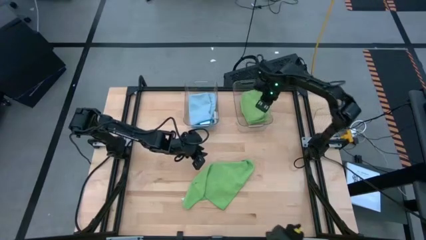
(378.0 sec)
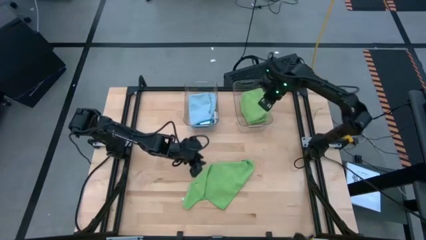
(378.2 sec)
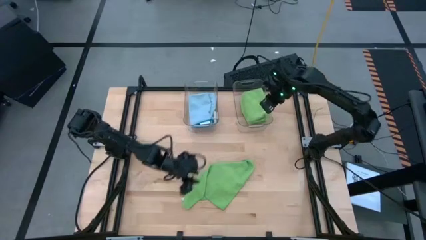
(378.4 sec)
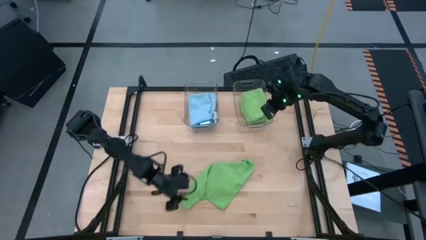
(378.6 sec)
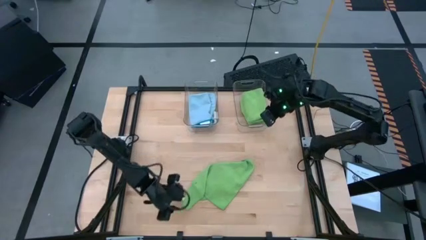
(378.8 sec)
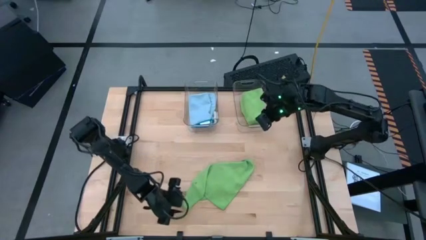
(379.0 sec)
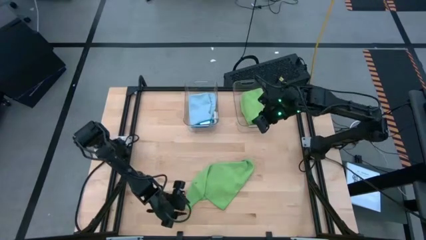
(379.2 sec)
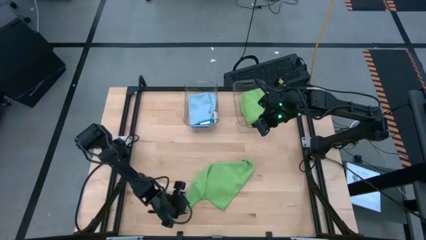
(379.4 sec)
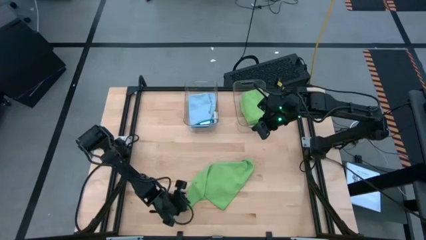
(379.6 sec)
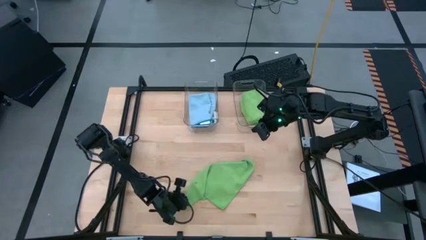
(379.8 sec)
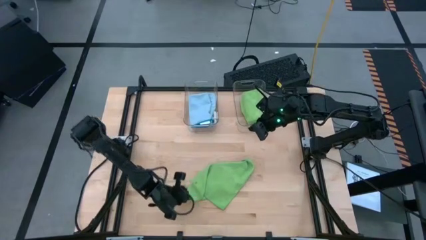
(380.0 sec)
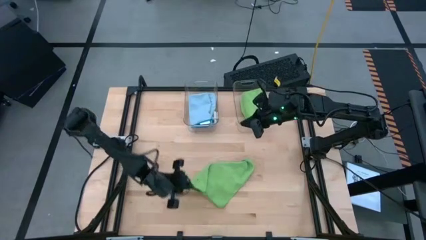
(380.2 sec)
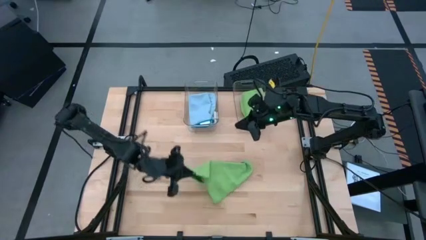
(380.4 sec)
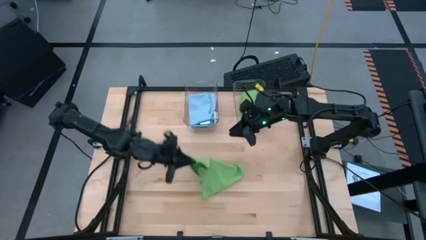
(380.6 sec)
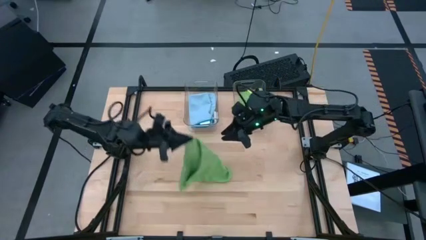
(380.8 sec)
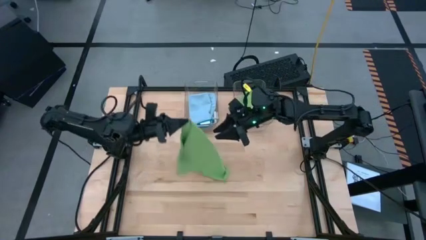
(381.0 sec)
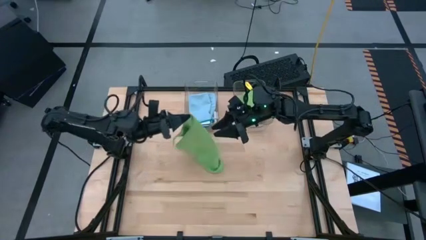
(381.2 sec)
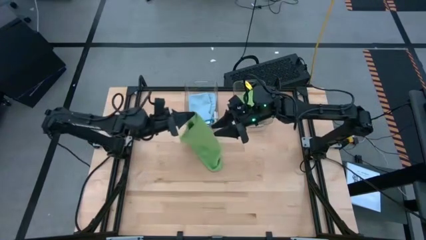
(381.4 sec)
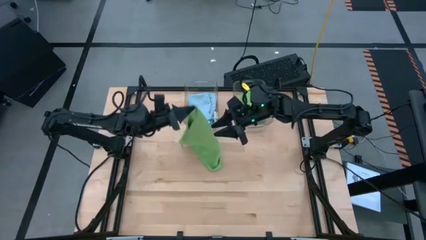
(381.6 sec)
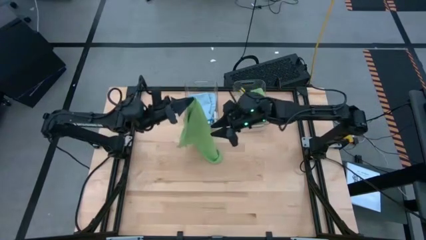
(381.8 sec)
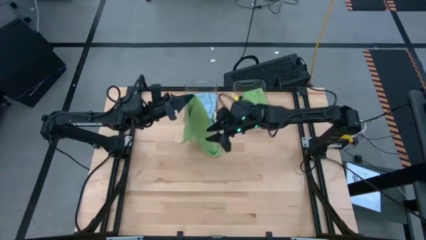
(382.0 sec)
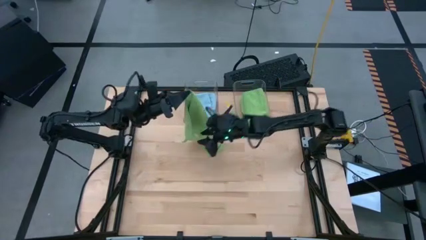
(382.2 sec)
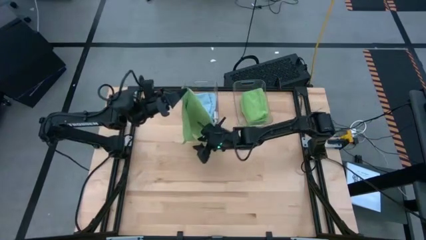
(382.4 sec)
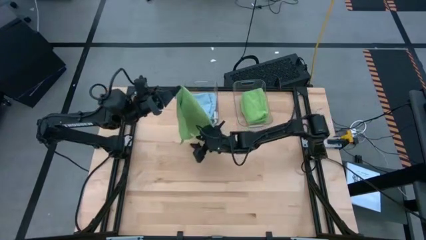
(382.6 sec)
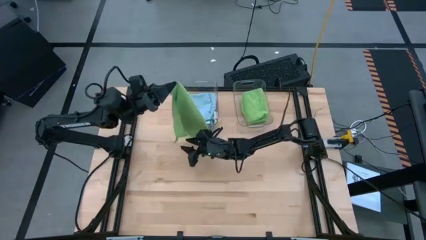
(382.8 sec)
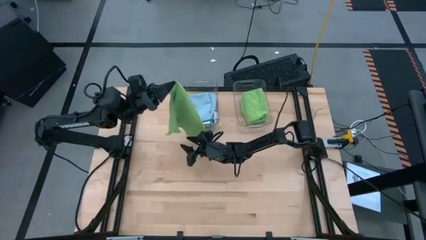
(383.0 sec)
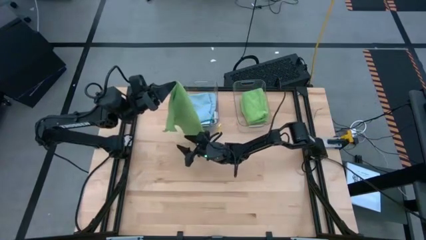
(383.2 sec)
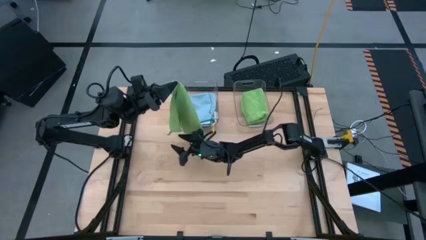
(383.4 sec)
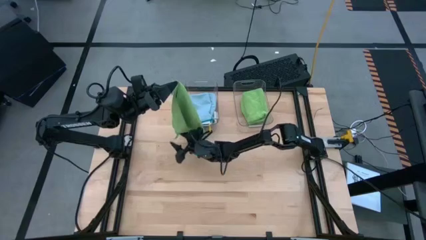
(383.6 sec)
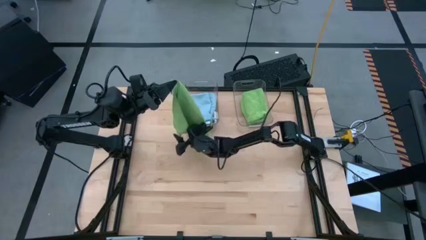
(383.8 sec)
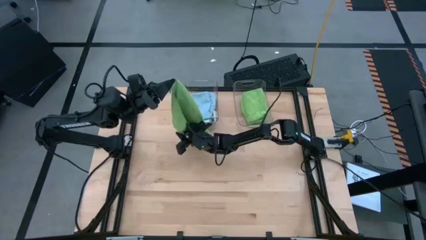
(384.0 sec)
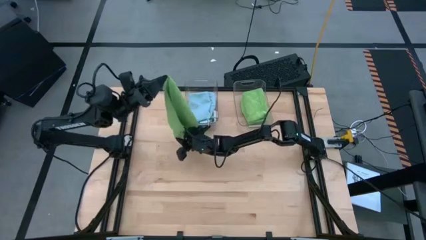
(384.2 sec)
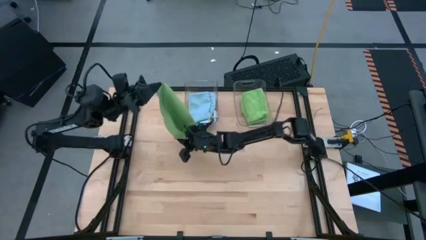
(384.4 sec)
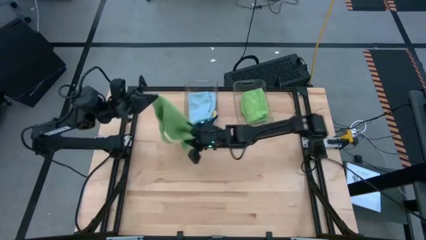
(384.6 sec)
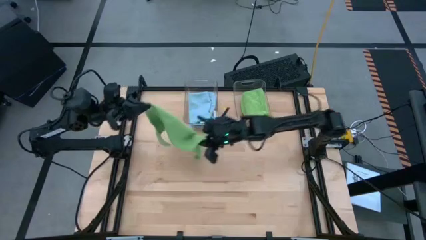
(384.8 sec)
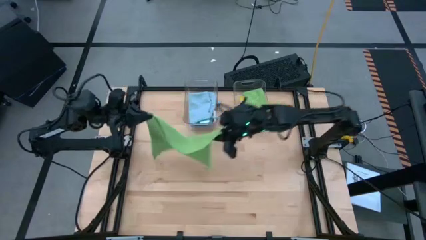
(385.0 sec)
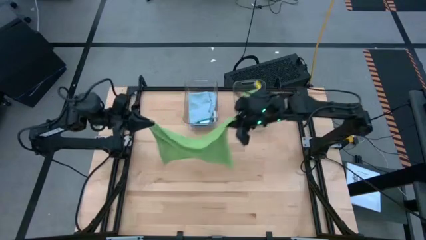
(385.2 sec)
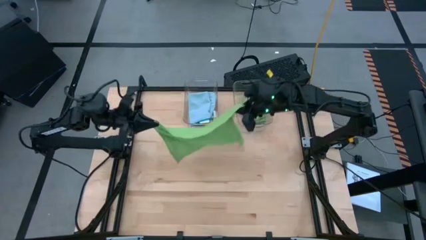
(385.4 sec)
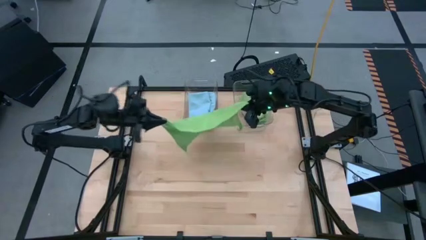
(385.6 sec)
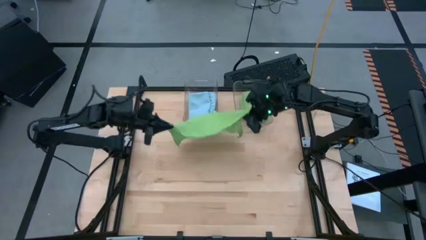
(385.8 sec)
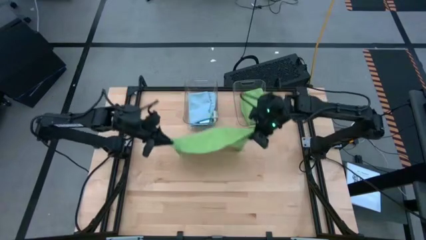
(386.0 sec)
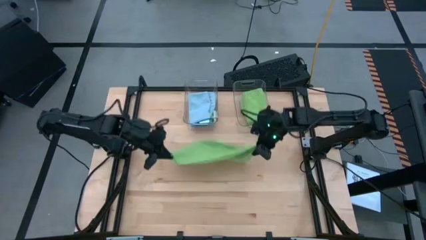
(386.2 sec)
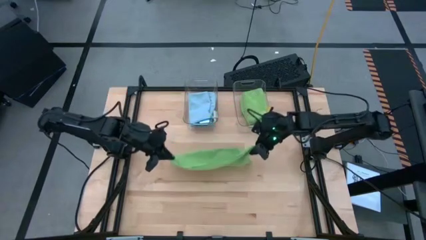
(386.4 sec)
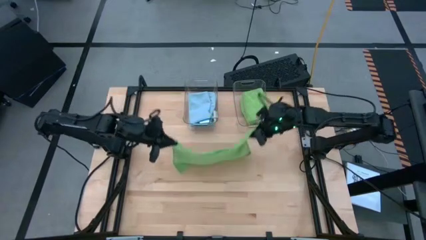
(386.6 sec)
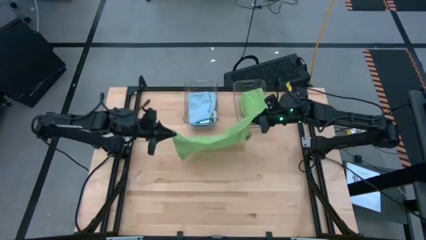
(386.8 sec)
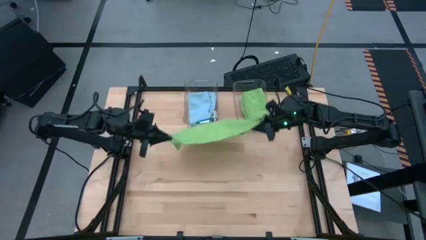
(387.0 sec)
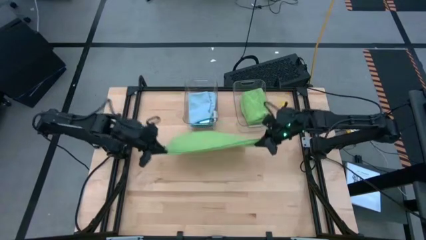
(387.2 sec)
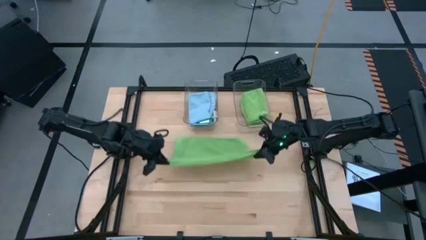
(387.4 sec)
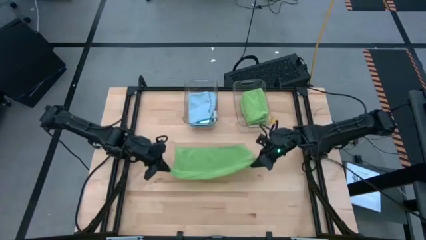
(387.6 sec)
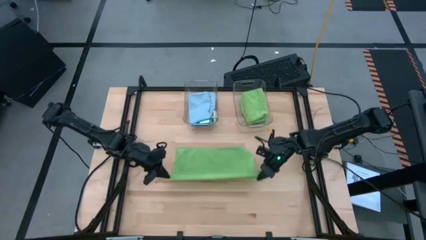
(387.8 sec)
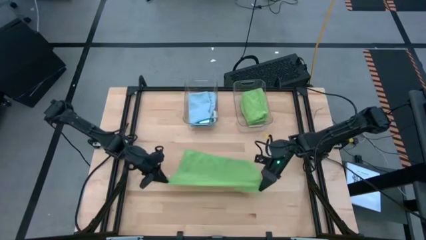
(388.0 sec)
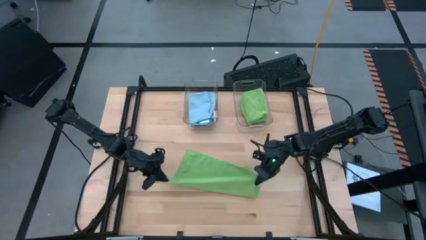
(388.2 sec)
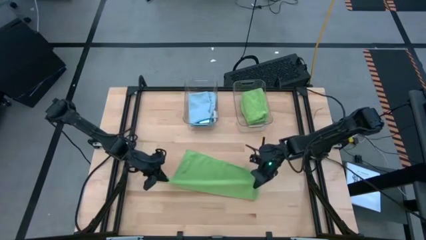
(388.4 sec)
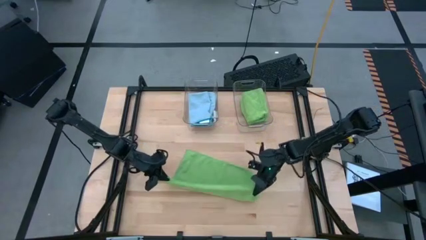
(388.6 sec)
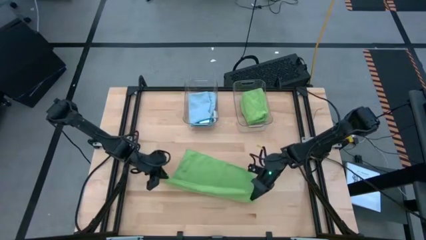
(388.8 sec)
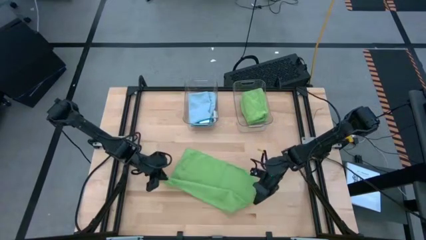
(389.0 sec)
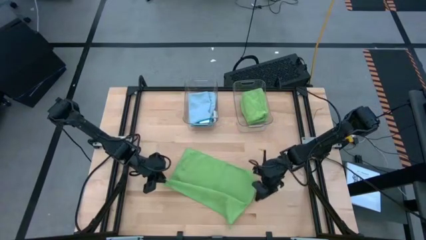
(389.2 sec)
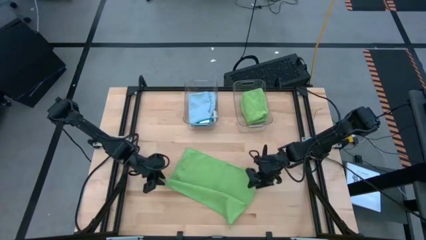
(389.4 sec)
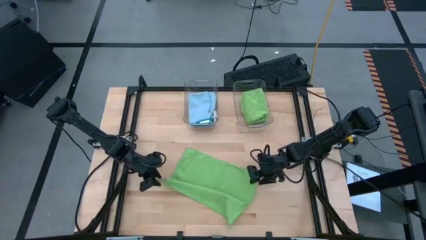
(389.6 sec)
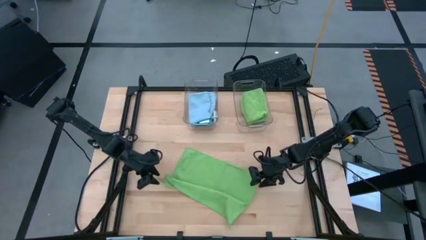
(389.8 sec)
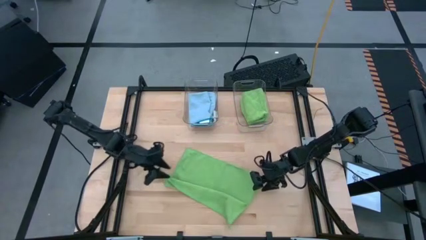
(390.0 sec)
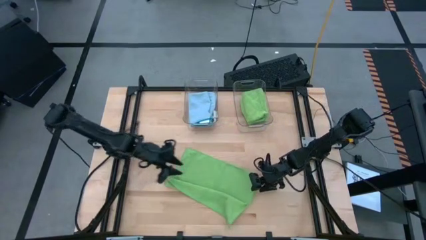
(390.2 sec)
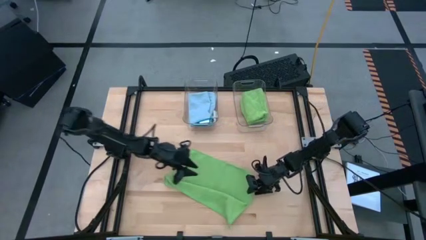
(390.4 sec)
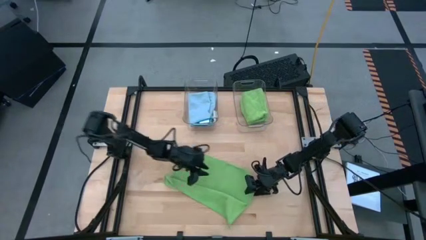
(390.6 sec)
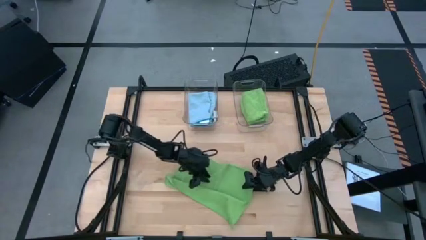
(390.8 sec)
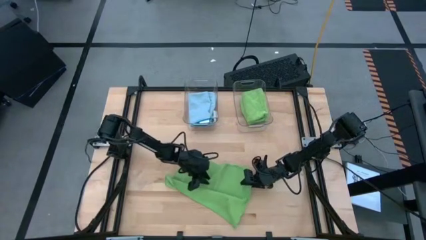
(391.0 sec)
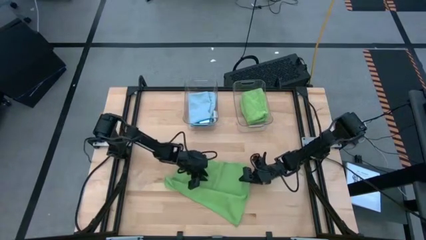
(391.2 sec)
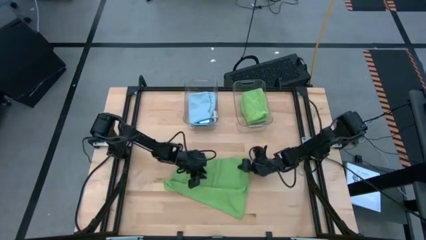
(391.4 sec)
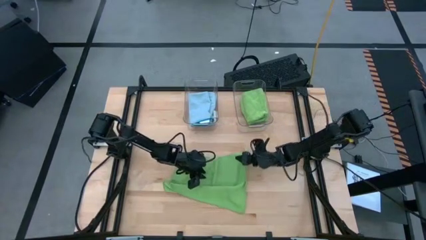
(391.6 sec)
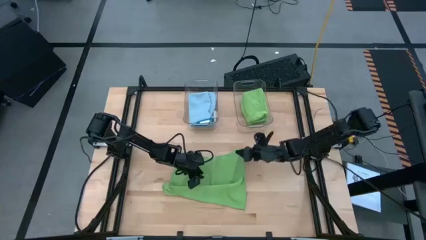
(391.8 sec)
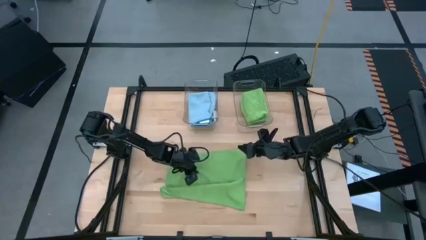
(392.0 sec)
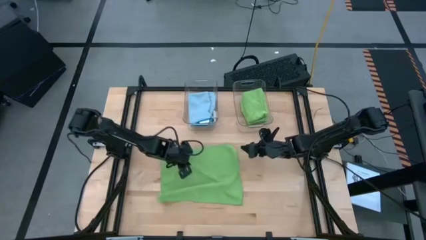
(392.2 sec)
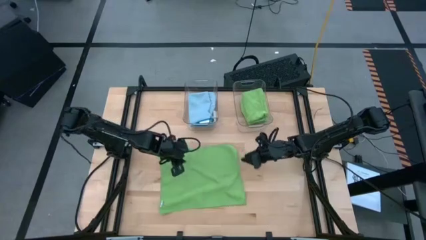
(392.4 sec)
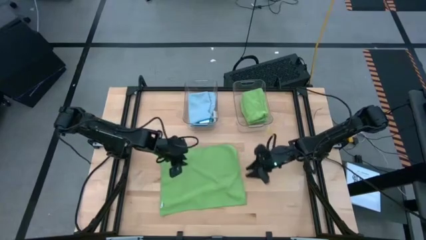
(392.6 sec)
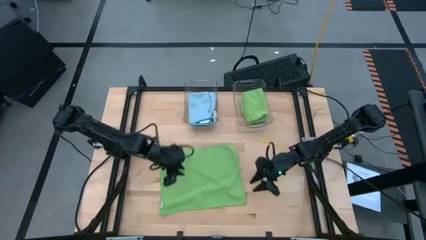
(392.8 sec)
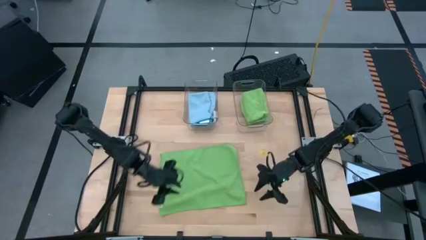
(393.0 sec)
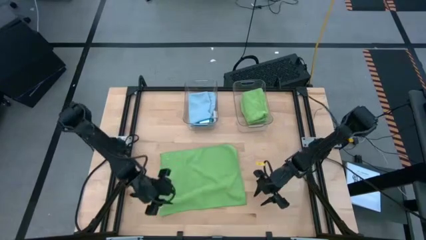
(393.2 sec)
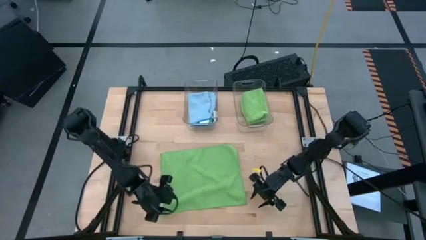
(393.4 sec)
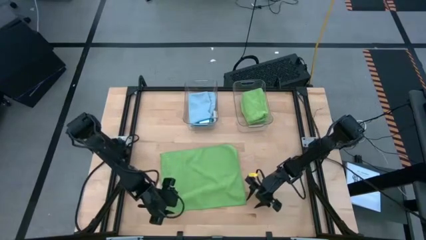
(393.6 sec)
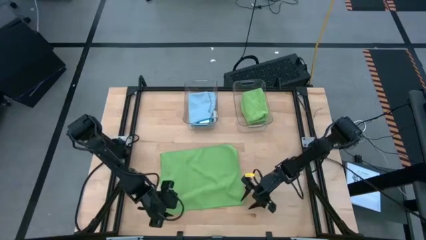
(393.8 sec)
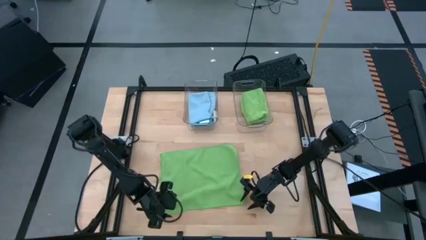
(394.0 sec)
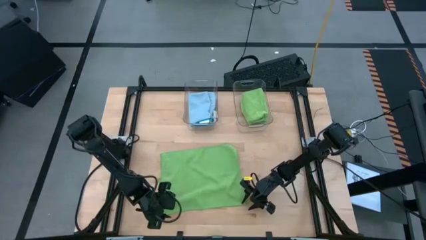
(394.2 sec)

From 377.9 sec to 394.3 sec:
Task: Fold microfiber towels
Fold the green microfiber towel
